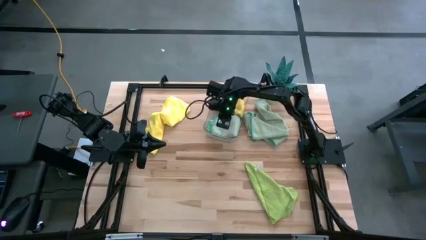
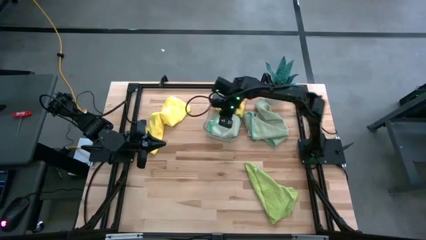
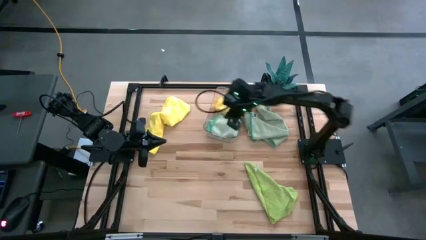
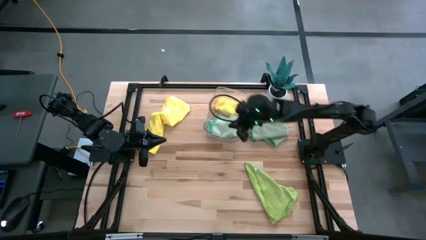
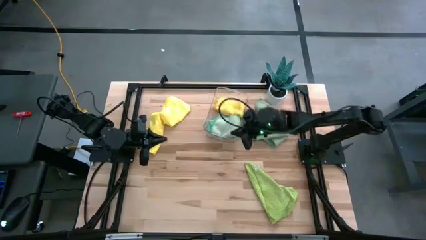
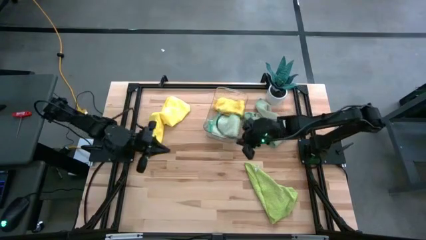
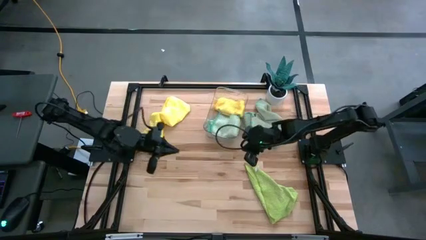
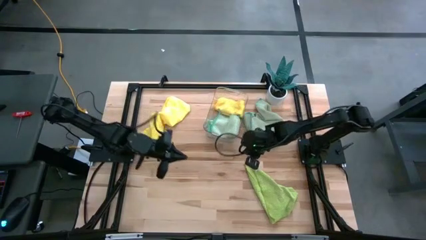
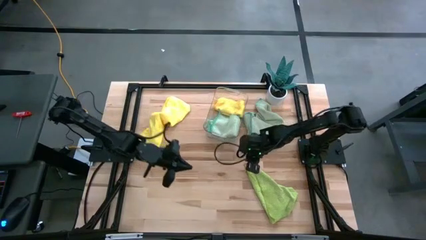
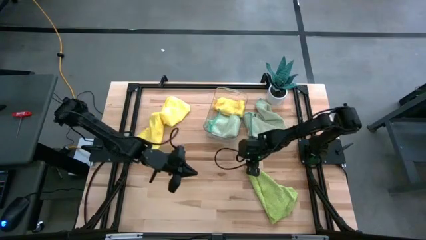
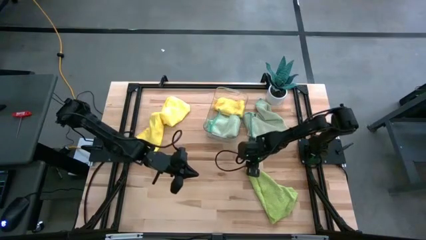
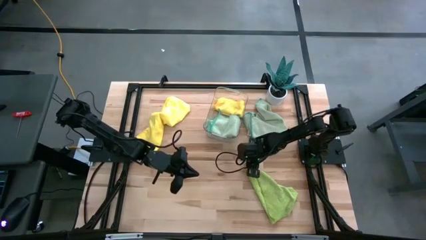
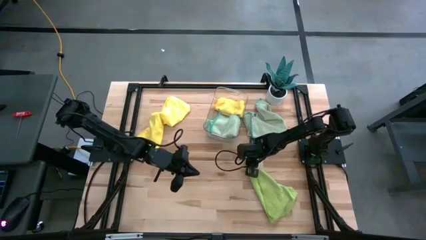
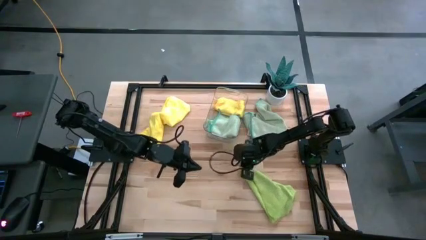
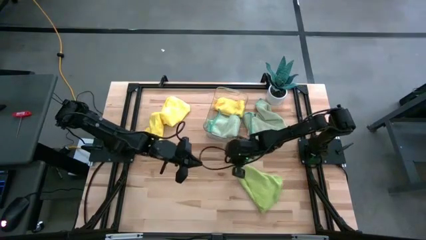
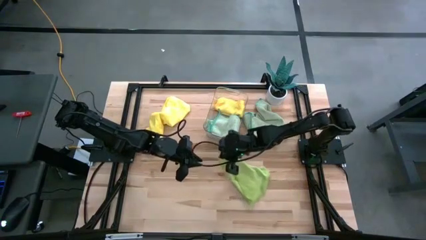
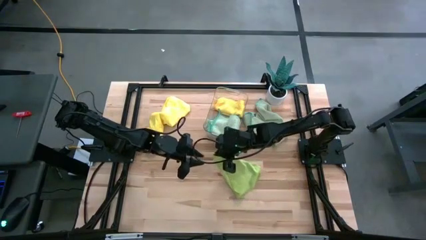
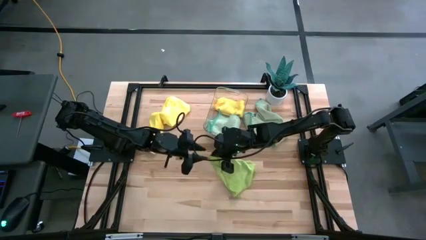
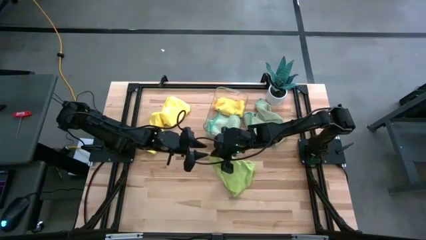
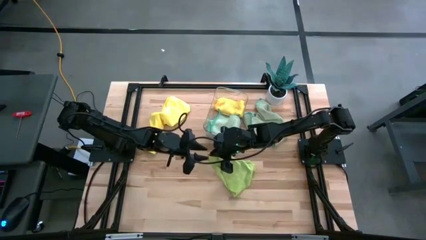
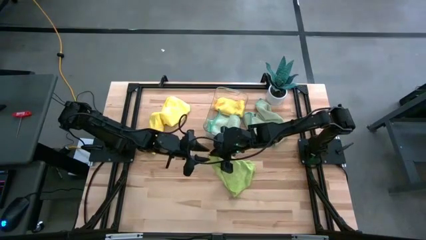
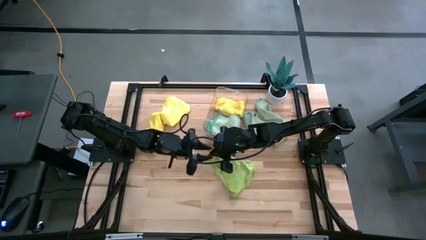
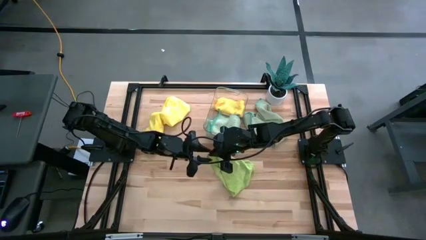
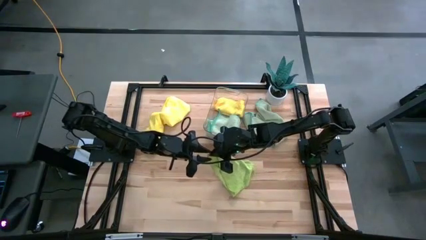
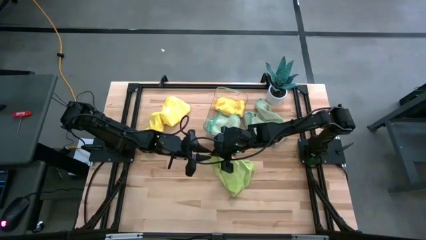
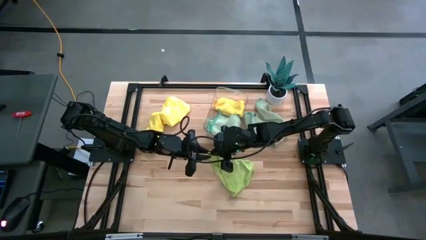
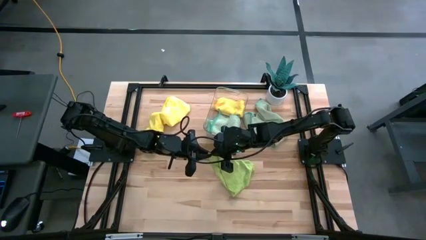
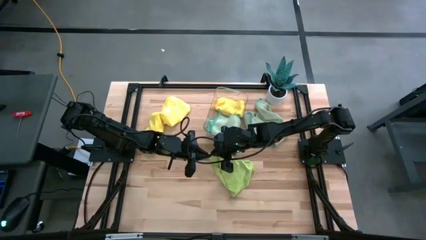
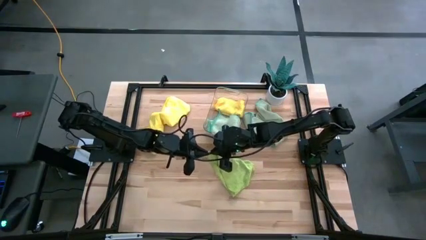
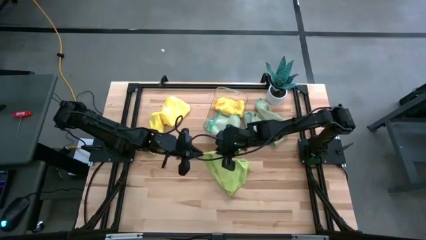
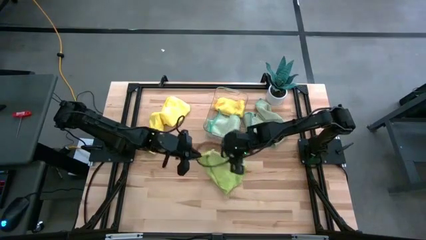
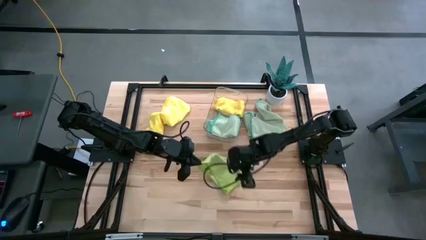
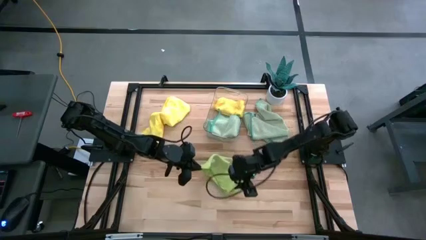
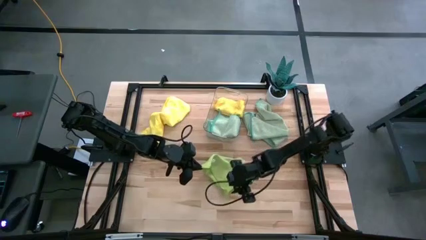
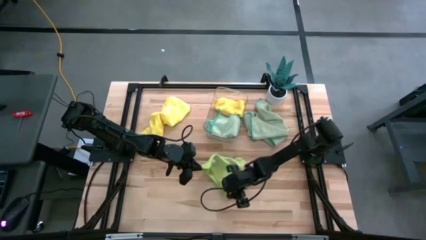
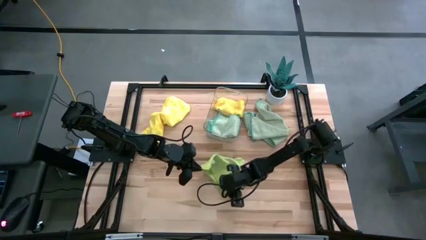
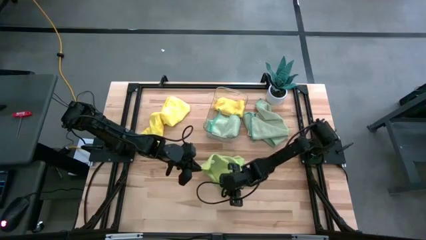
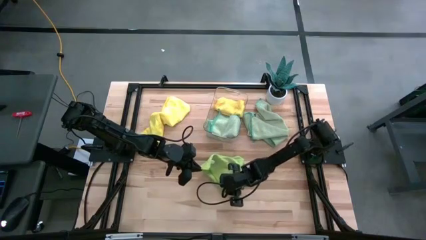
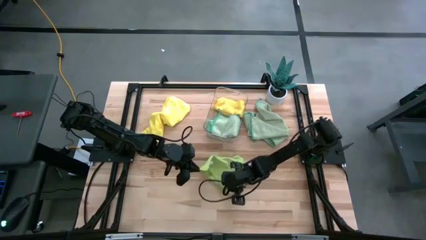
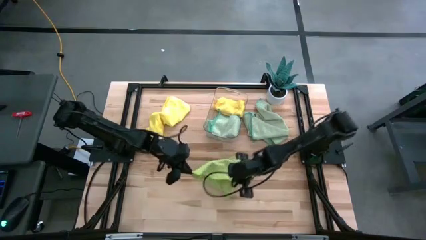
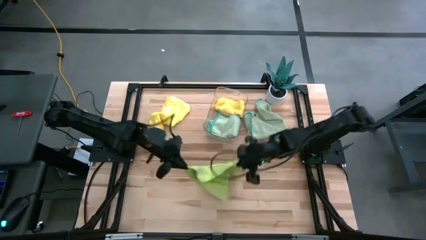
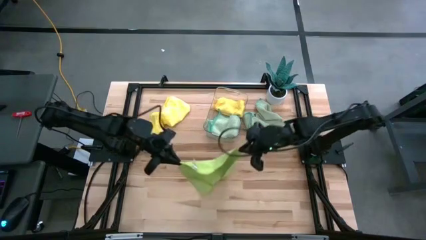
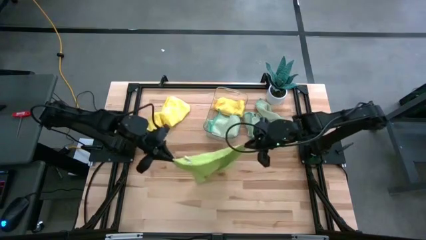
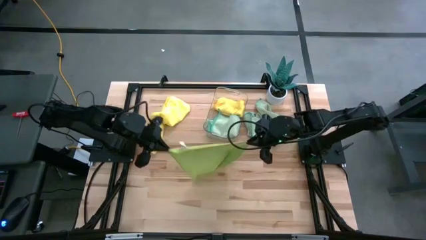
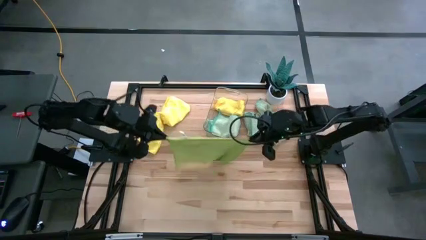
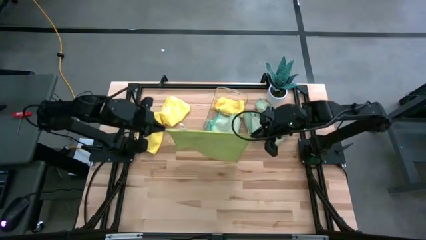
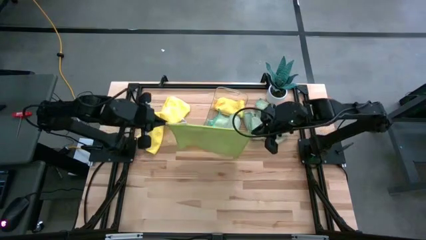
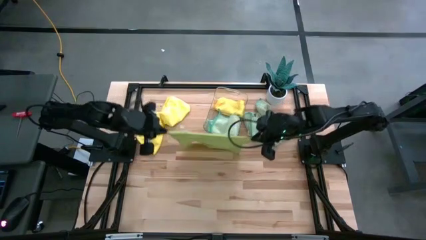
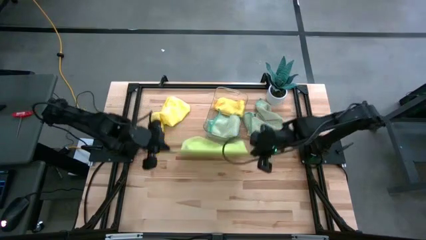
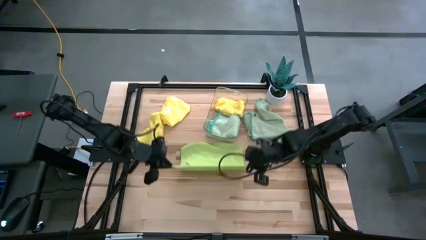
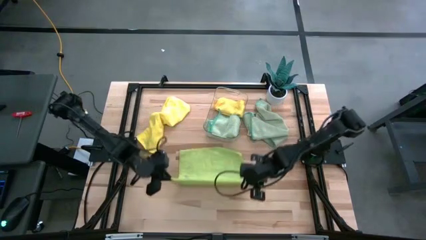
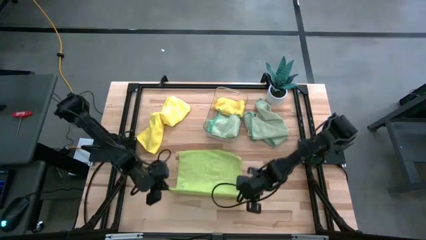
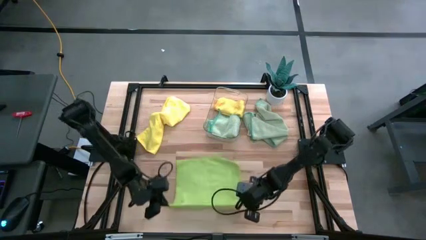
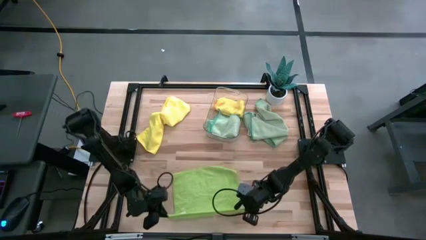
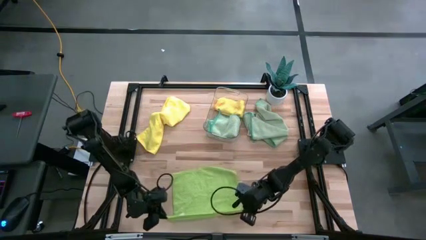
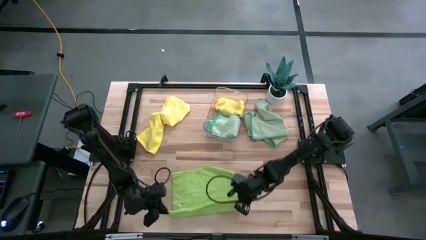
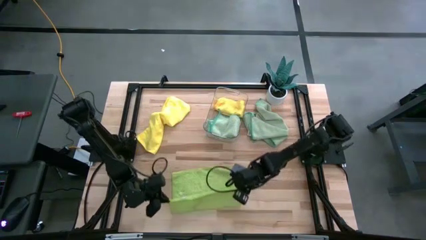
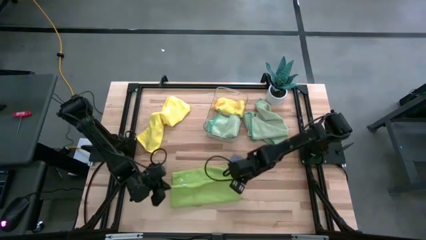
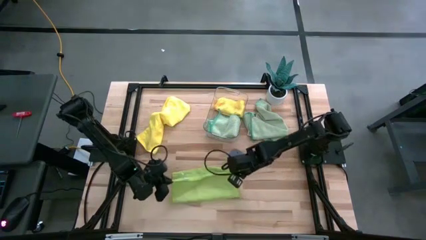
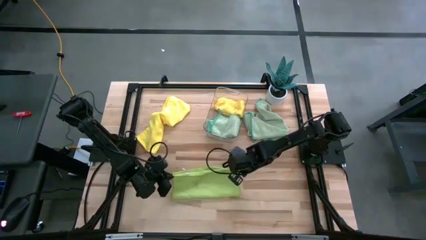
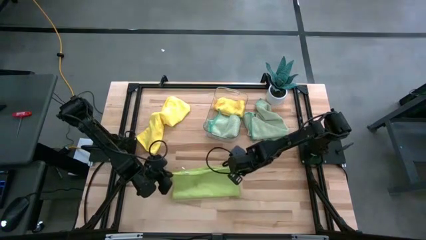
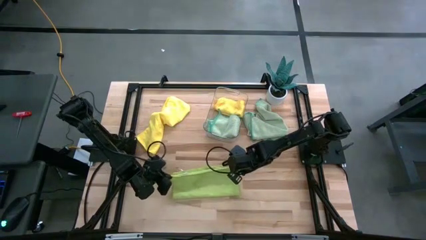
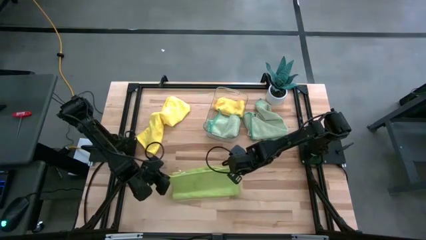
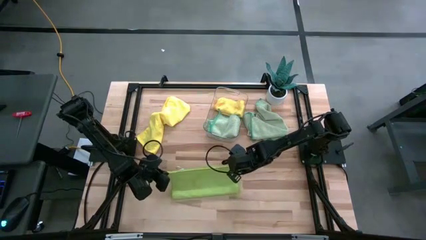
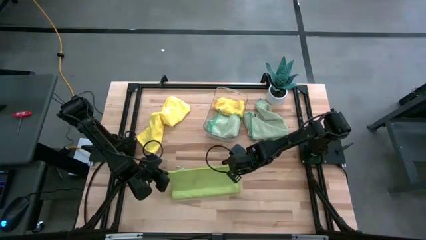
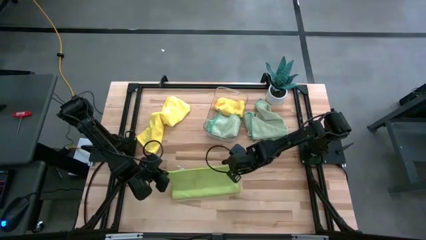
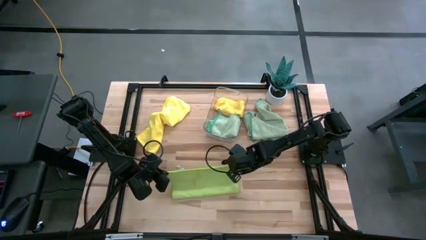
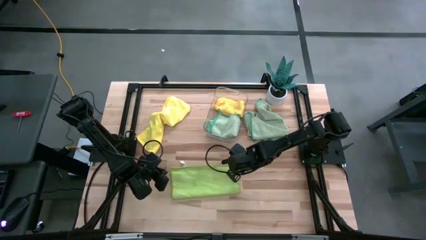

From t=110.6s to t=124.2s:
Task: Fold microfiber towels
Fold the green towel

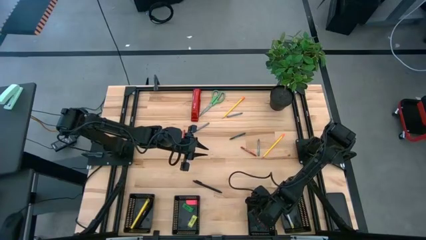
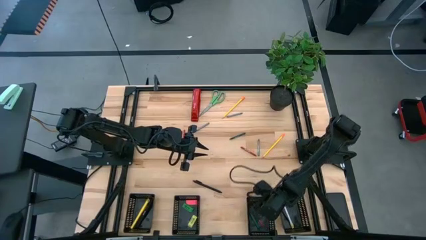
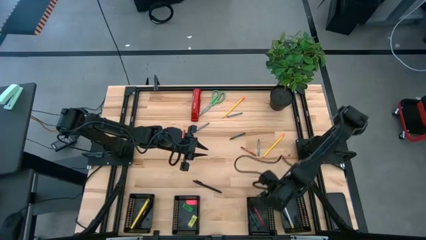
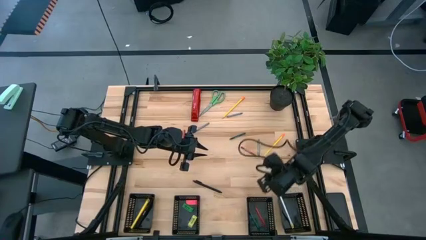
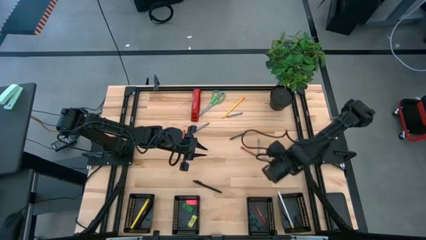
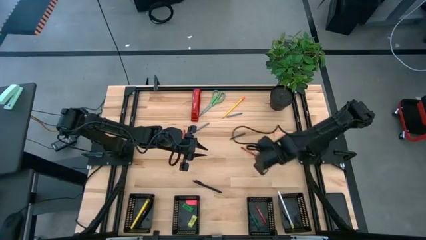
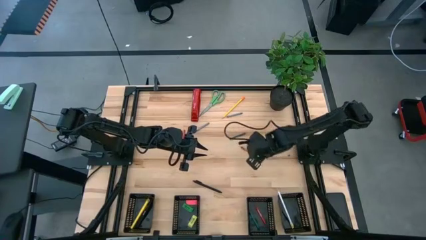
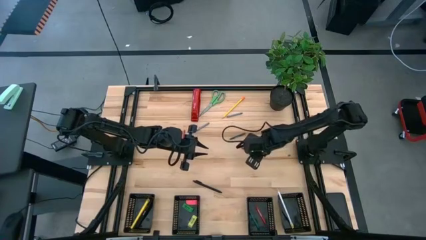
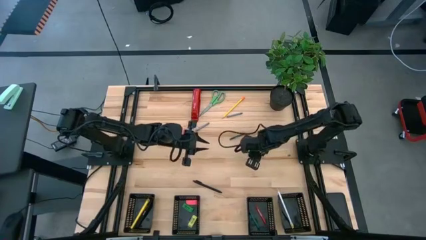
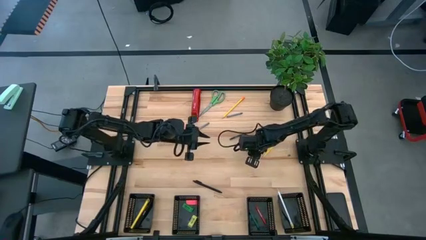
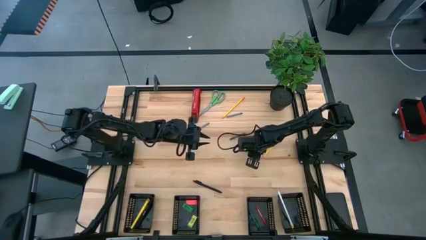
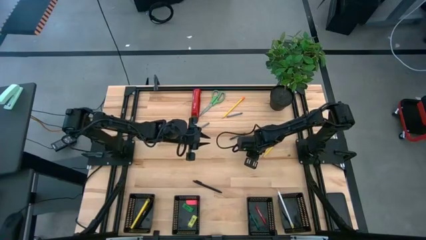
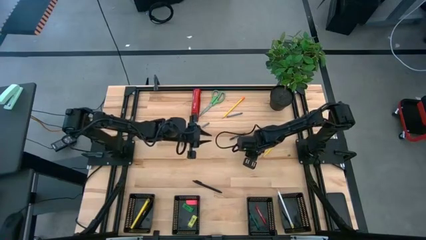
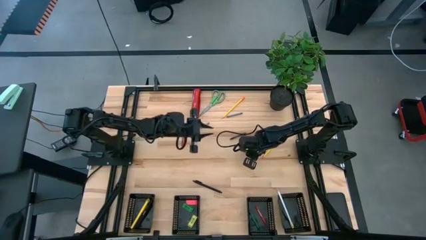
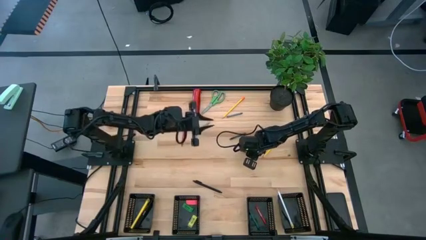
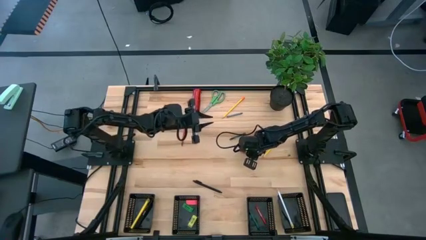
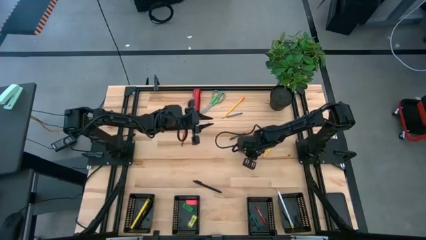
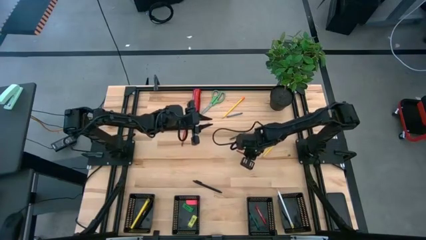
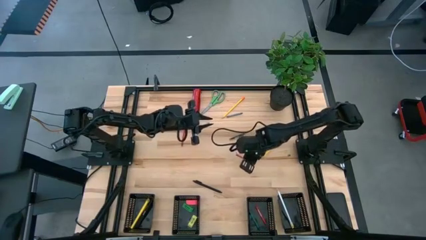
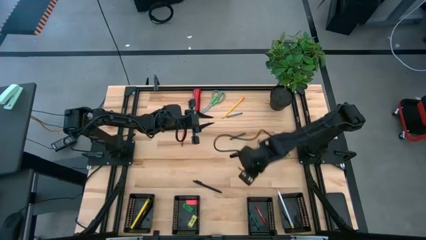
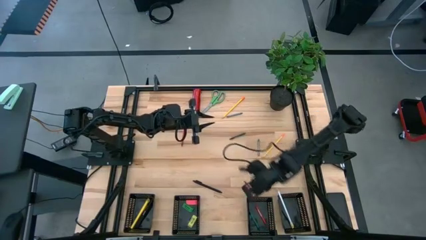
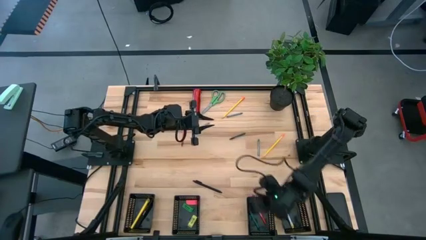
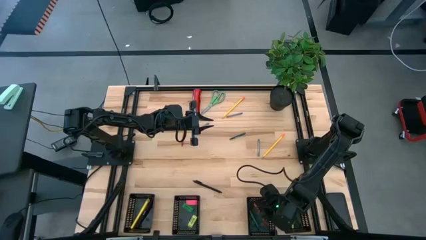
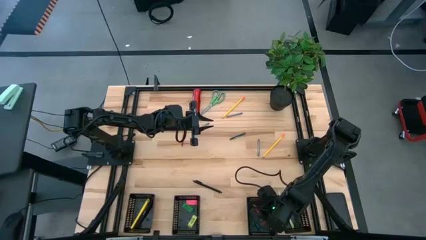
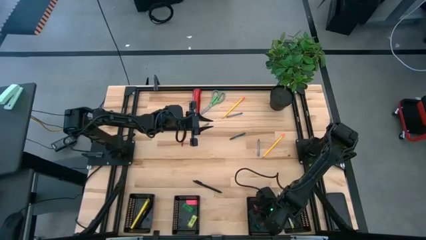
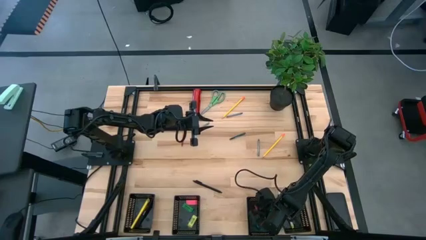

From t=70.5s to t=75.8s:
Task: Sort crayons/erasers/pens/pencils in bins
Put the right red crayon into the middle right black bin
